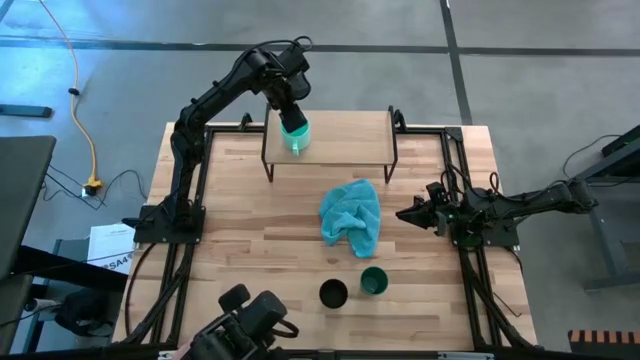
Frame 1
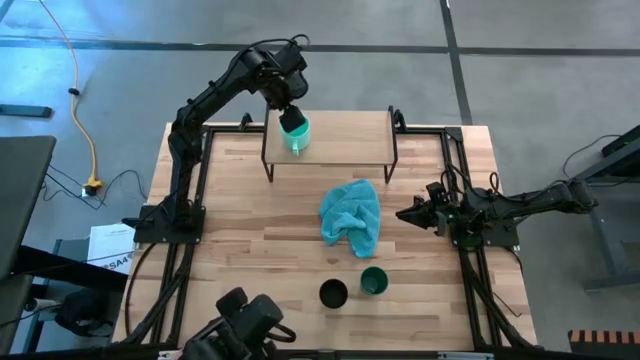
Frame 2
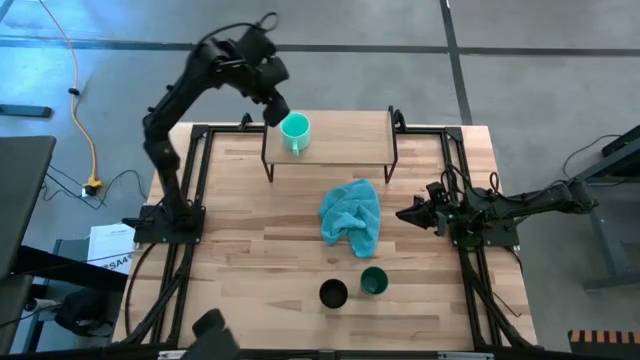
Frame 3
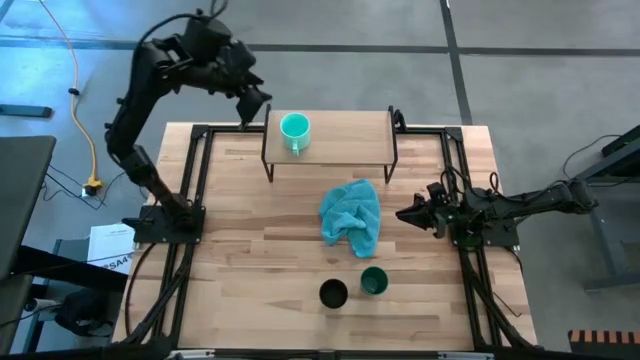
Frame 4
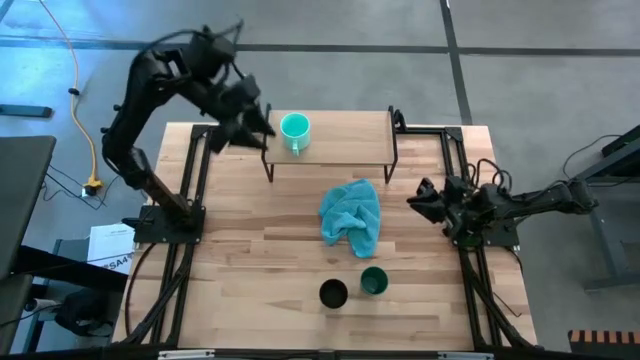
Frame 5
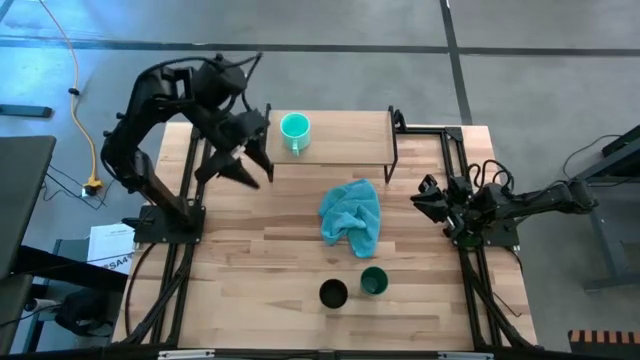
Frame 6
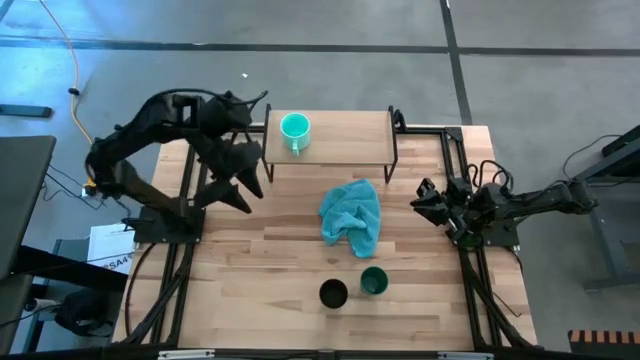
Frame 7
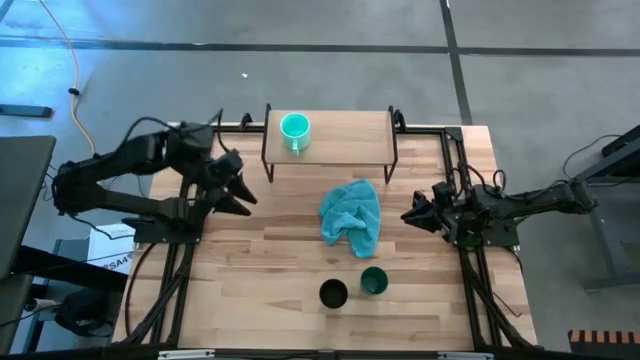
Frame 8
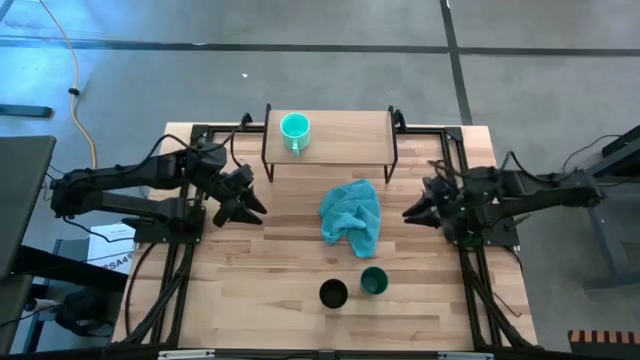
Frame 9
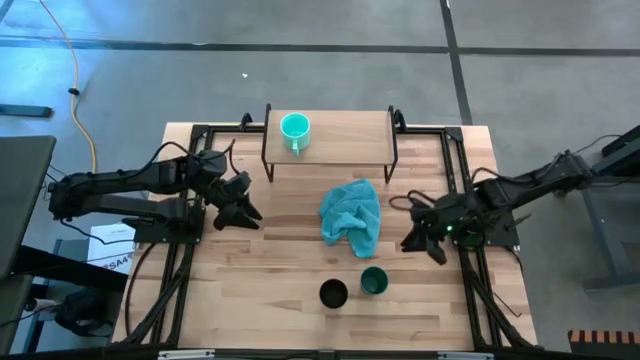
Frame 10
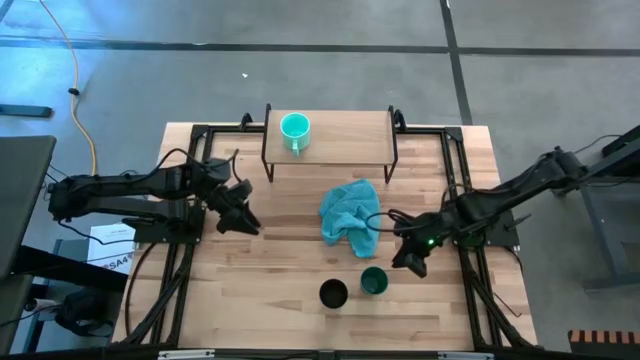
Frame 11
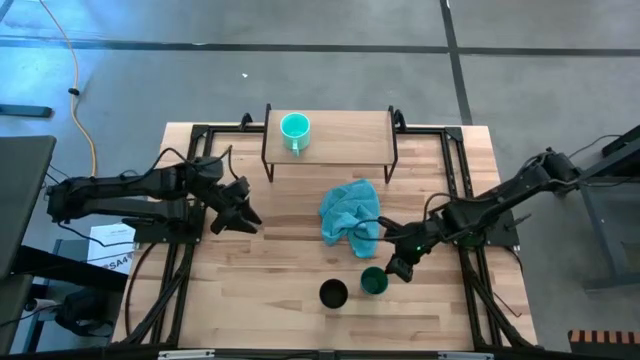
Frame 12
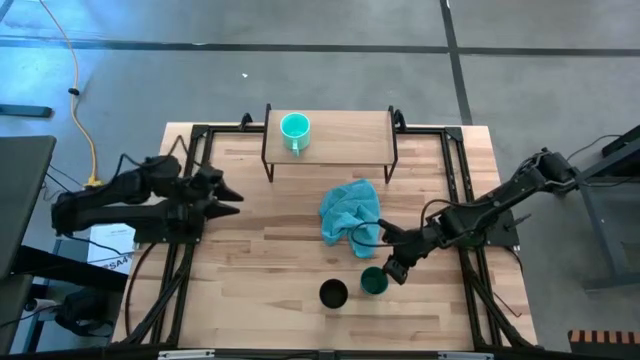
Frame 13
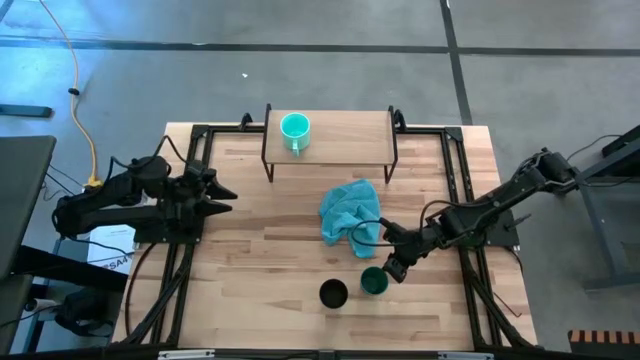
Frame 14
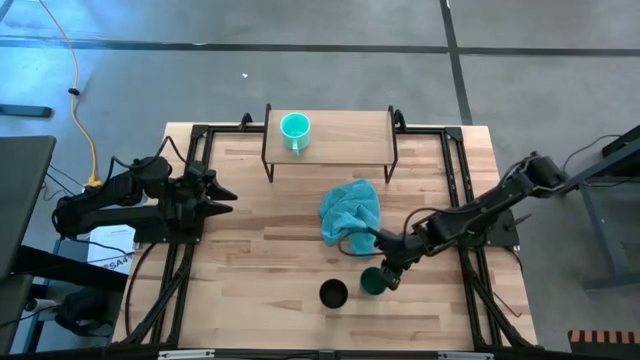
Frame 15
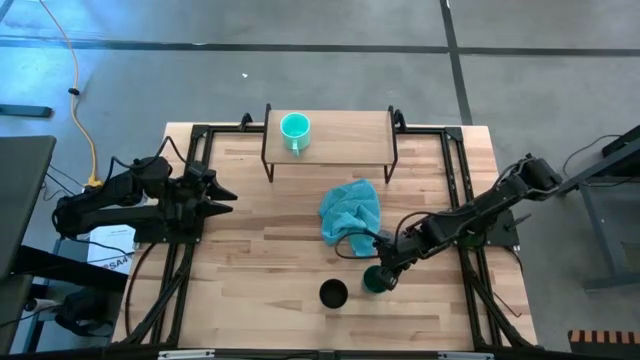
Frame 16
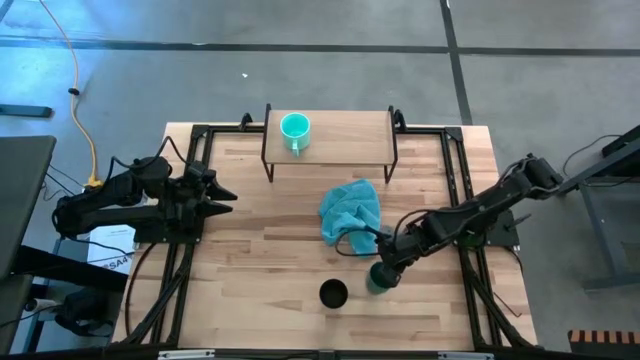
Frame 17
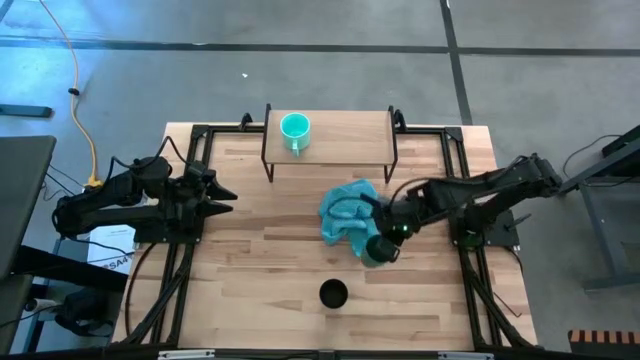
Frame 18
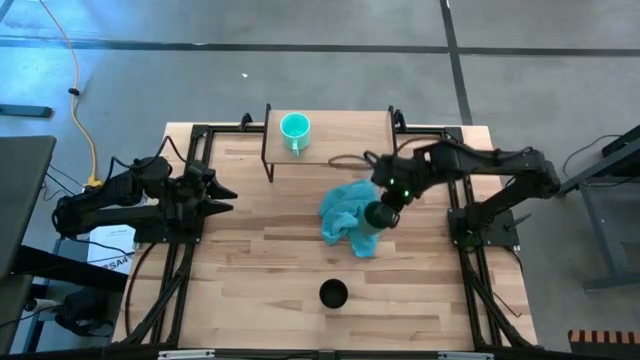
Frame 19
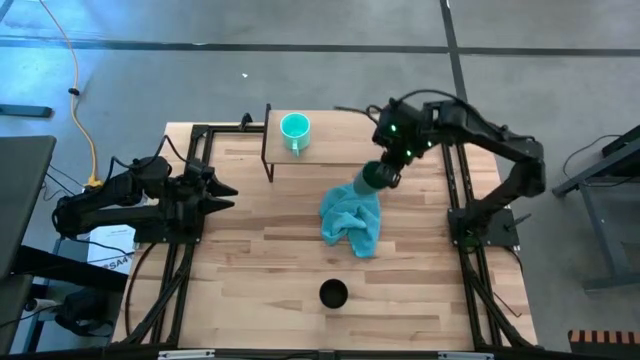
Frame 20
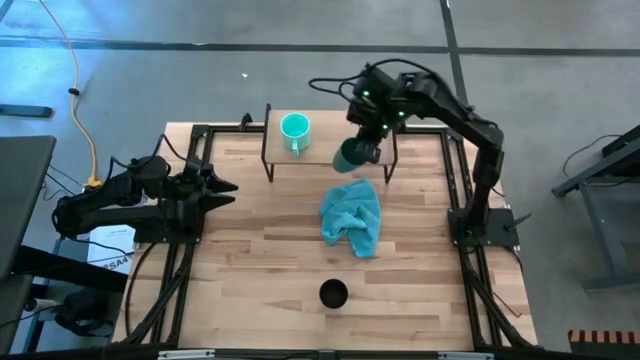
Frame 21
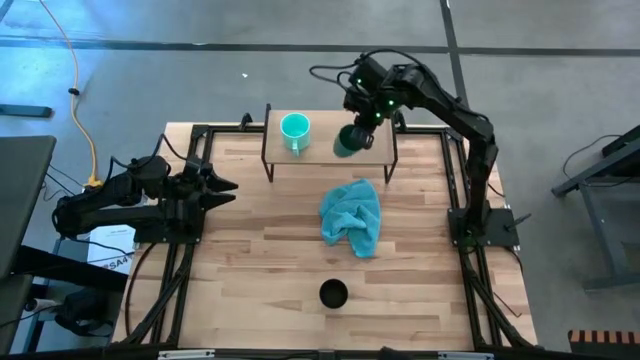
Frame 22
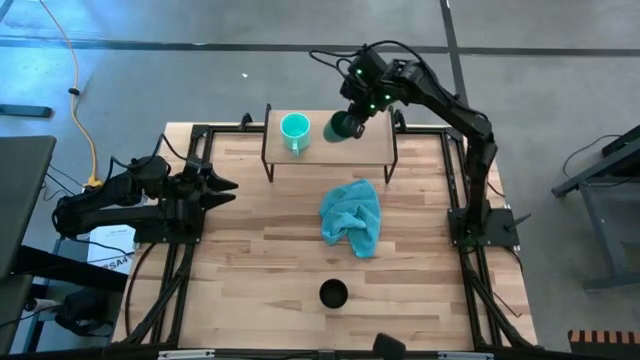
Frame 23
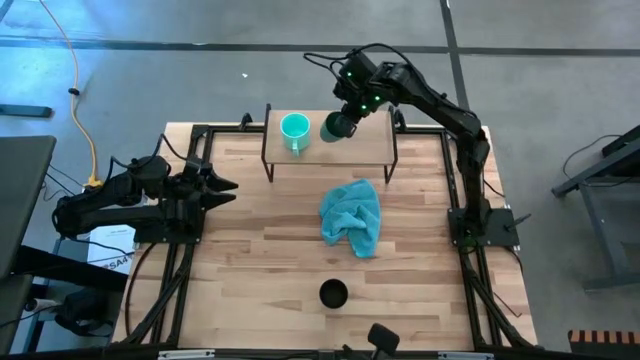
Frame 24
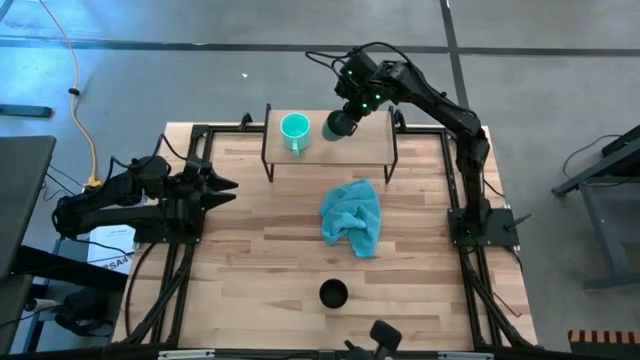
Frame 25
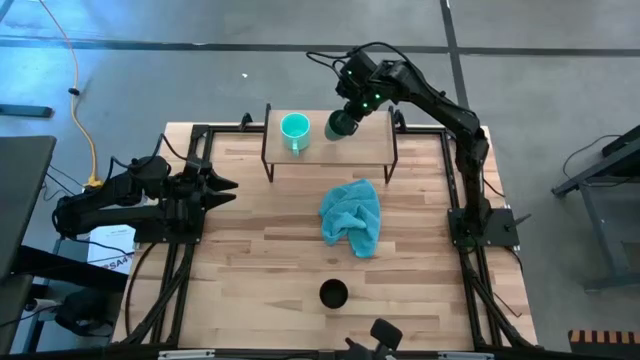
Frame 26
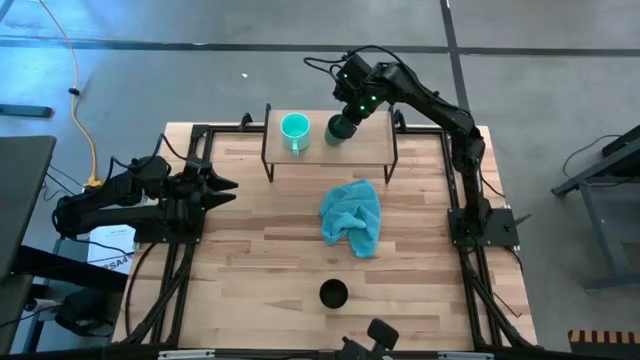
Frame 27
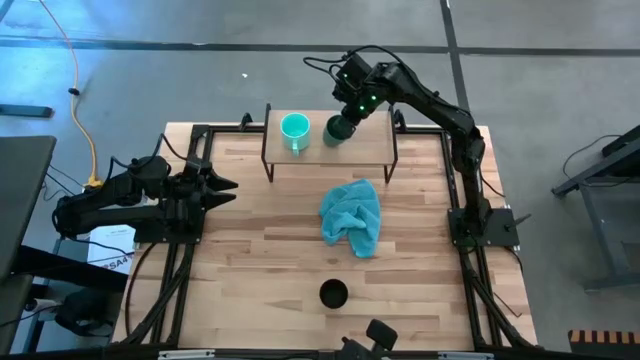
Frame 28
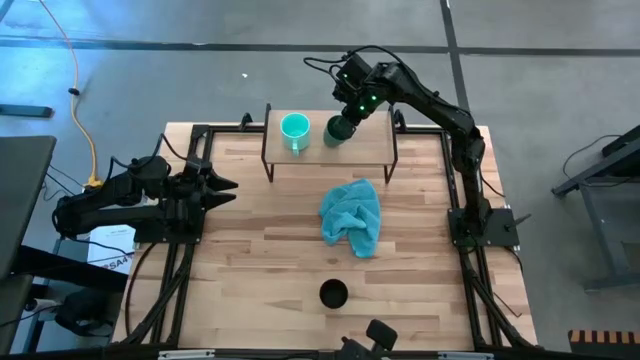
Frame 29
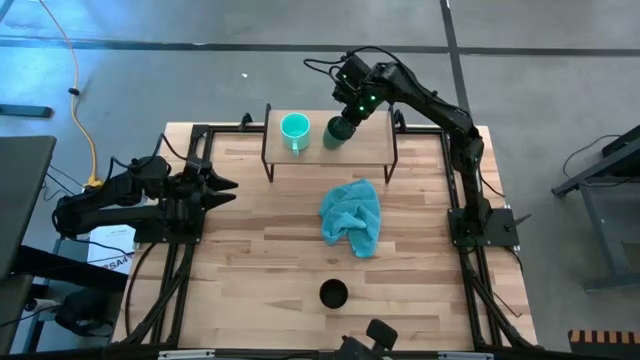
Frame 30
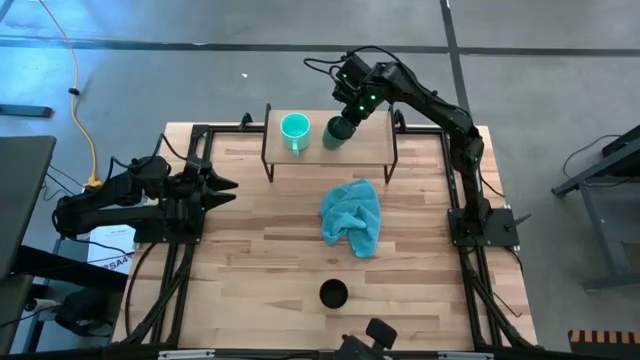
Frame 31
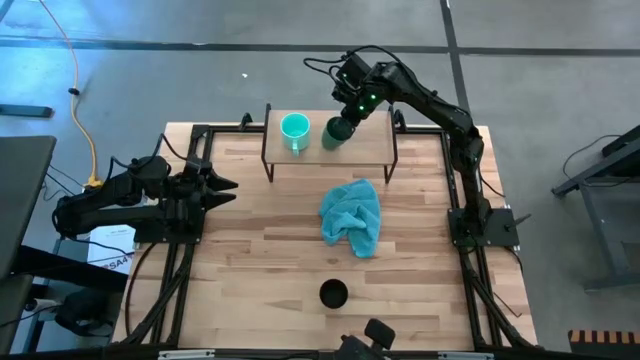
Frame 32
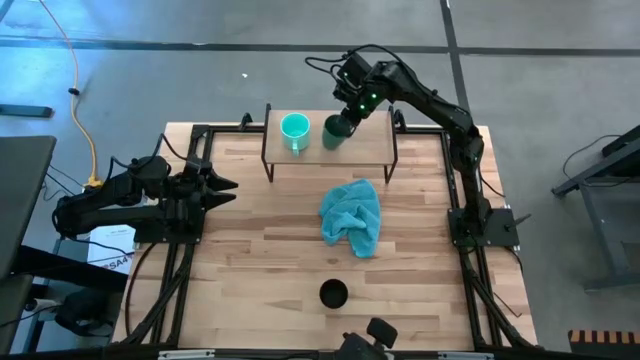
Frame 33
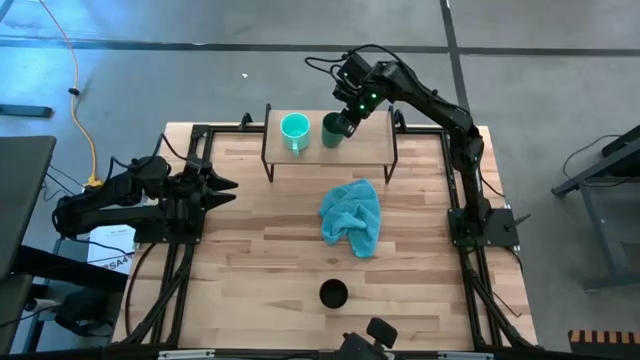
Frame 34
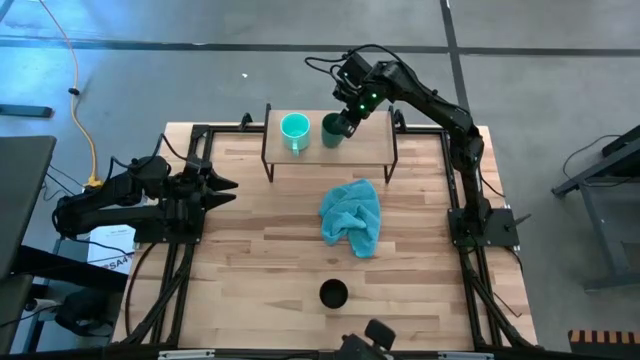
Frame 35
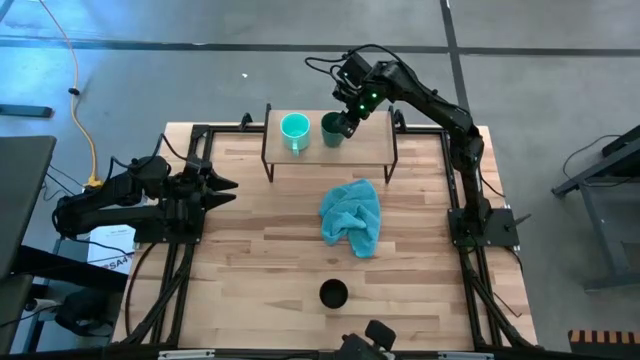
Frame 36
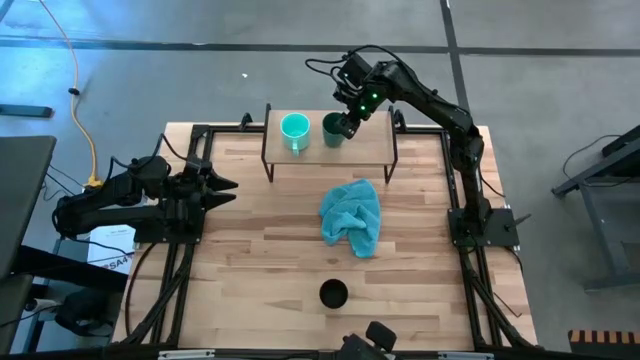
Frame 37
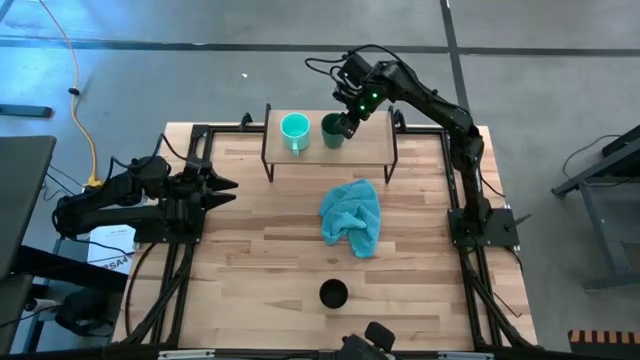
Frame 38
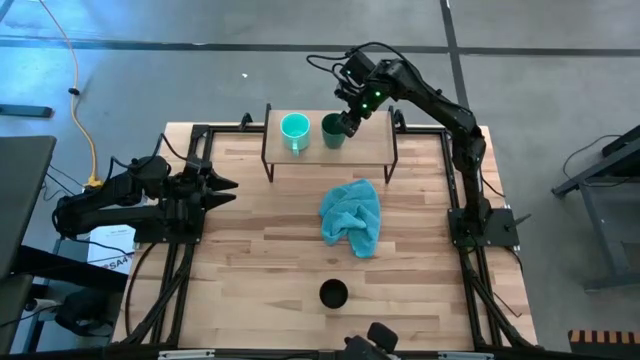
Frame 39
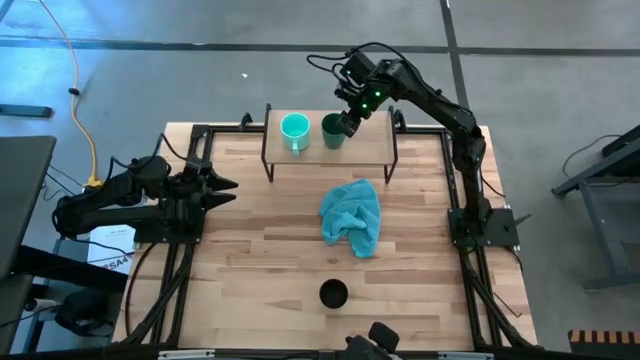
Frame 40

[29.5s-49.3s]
Task: Stack small to large cups/mugs on shelf
Put the green cup on the shelf
